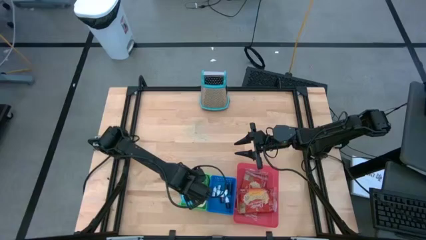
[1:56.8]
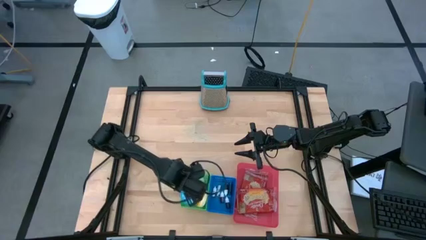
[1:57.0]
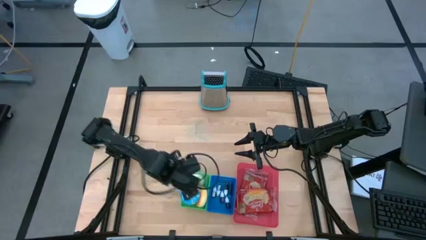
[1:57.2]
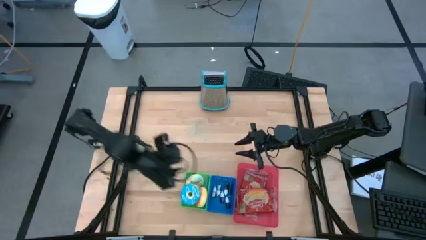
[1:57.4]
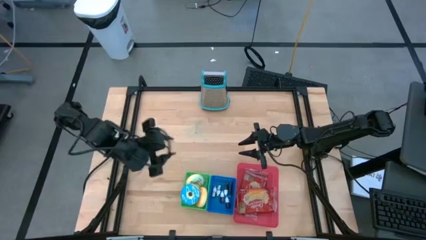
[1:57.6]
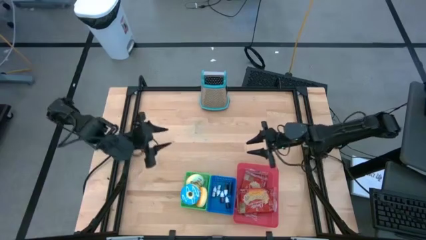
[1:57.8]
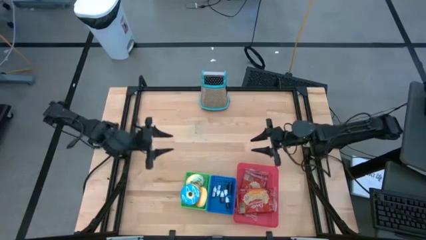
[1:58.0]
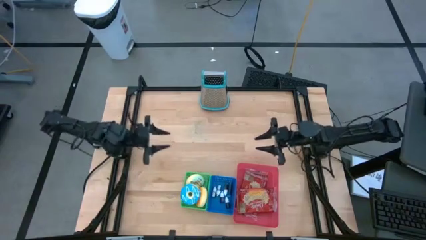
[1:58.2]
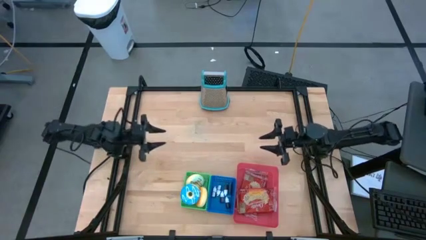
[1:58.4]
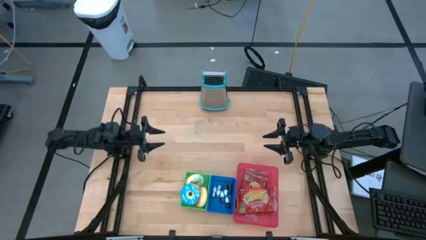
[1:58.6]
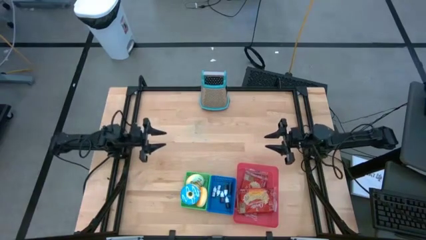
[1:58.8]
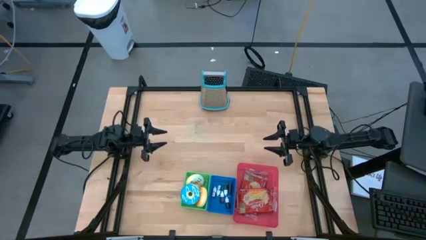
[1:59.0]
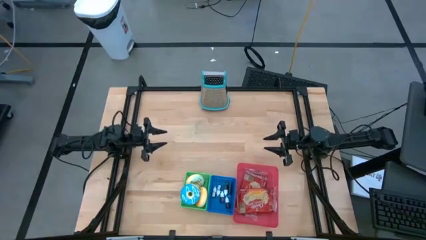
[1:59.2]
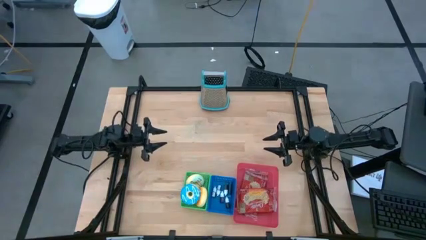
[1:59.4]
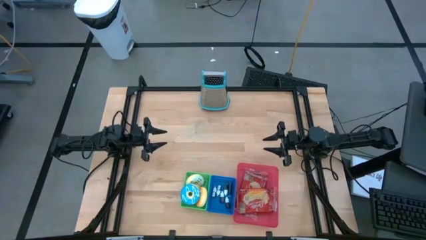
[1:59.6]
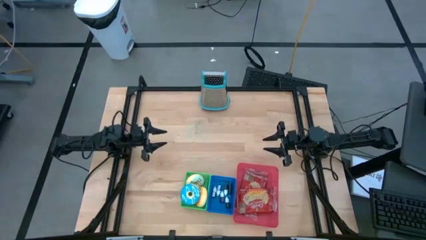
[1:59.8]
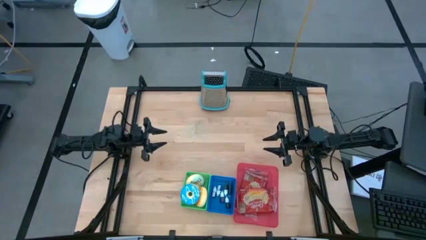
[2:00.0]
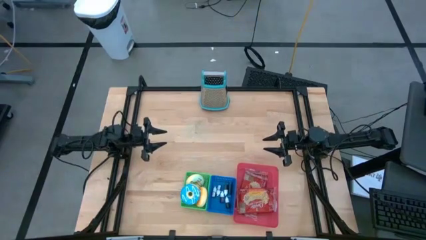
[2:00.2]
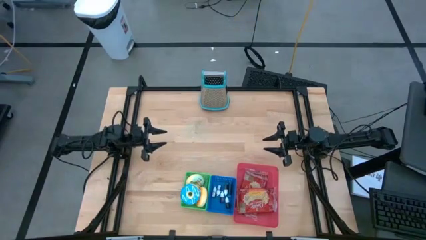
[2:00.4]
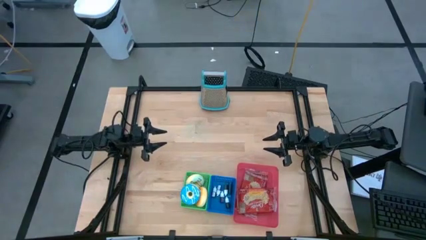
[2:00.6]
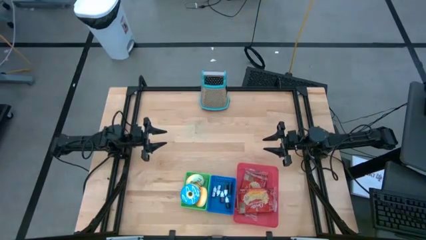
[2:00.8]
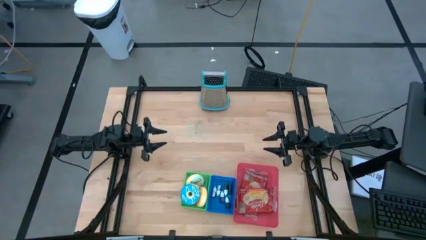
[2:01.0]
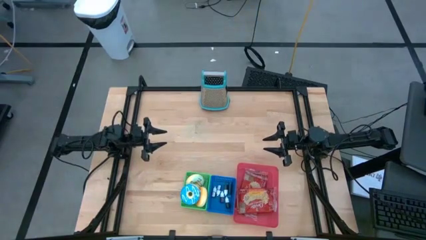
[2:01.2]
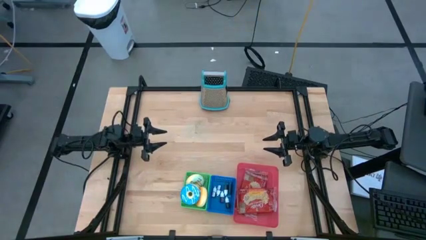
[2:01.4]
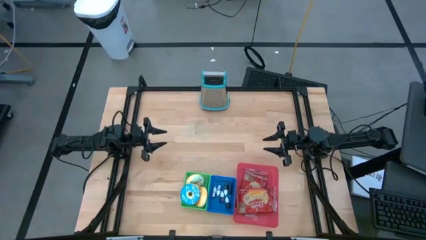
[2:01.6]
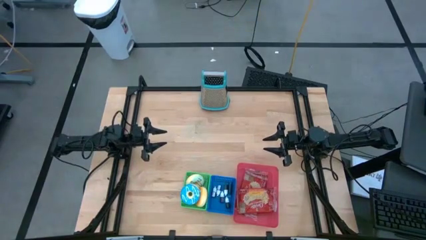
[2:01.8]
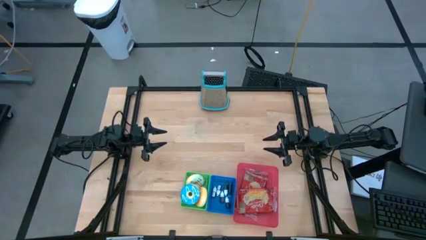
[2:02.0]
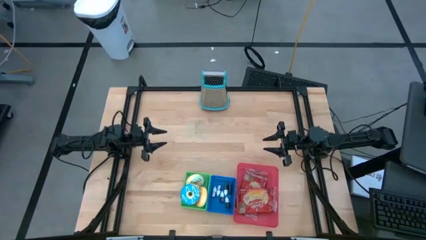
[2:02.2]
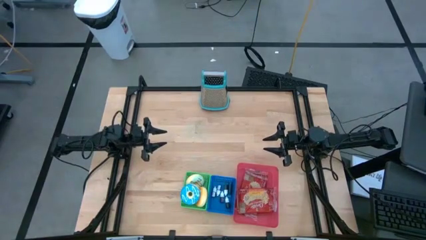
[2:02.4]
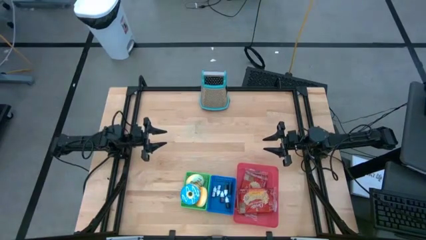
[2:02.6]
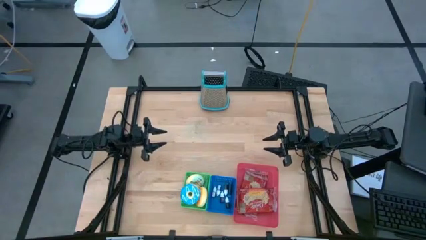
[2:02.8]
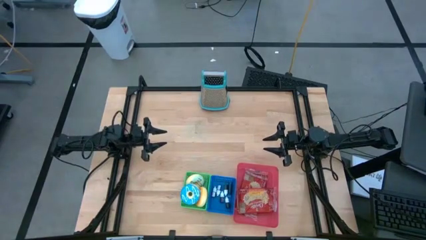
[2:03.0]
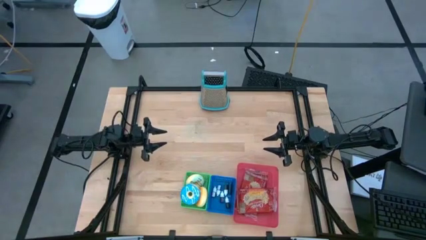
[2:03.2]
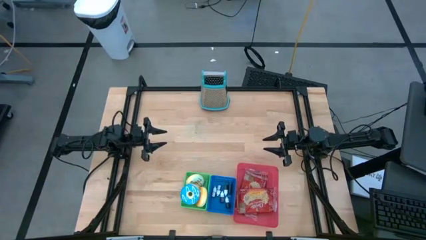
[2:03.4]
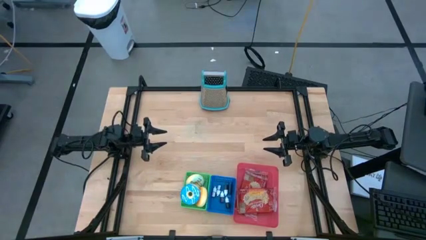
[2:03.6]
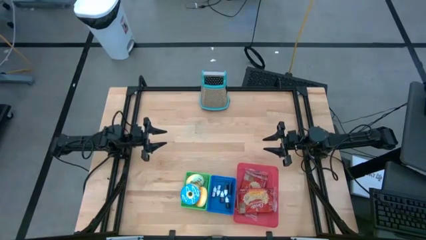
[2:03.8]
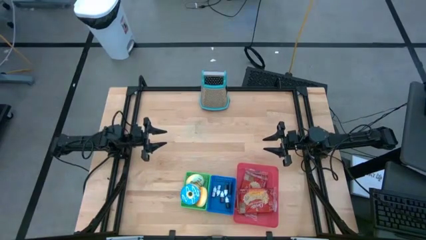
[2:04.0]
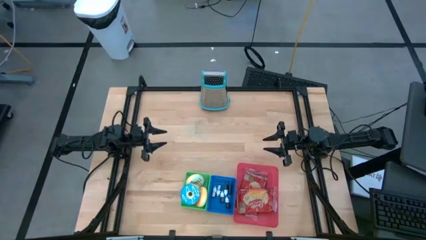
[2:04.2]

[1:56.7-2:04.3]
Return to Home Position

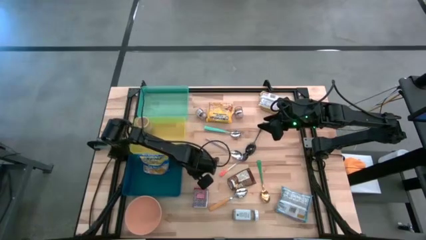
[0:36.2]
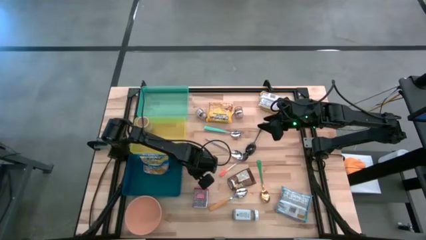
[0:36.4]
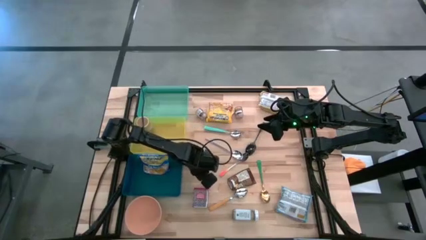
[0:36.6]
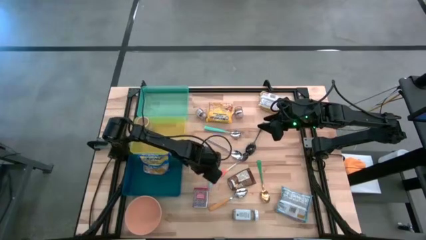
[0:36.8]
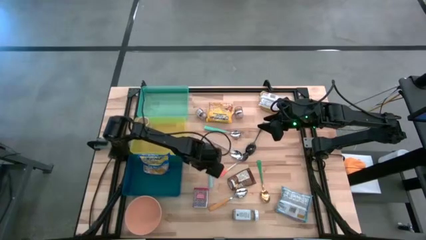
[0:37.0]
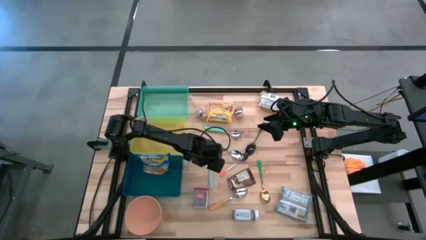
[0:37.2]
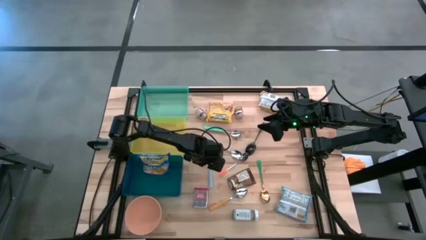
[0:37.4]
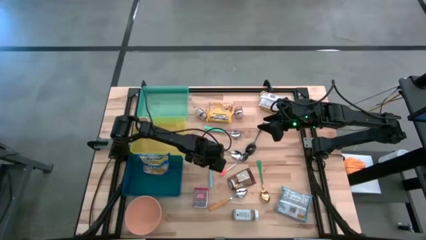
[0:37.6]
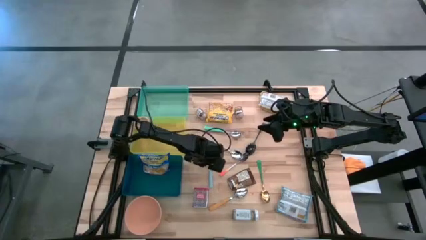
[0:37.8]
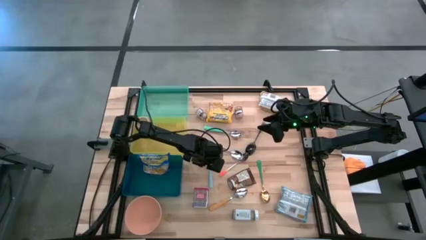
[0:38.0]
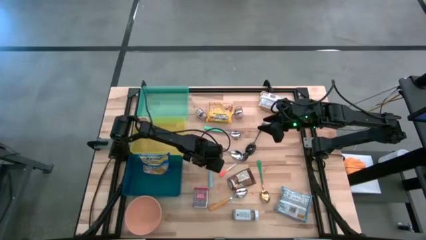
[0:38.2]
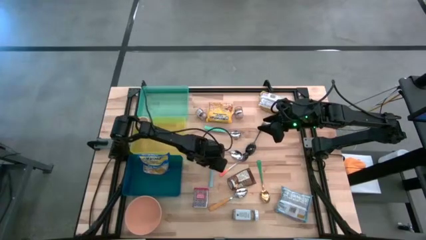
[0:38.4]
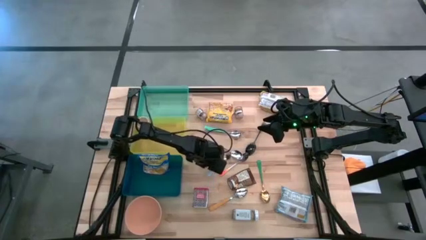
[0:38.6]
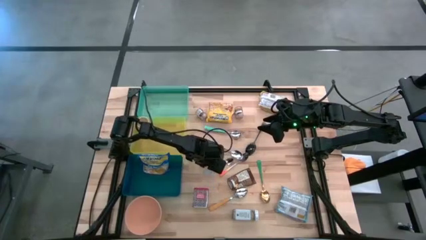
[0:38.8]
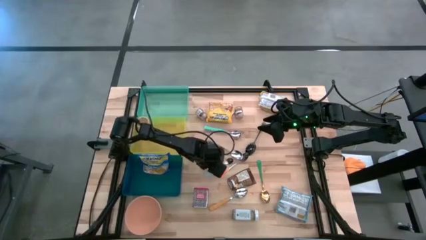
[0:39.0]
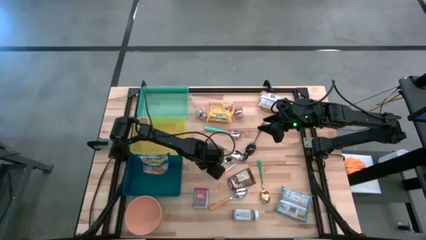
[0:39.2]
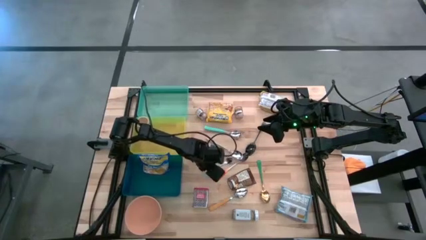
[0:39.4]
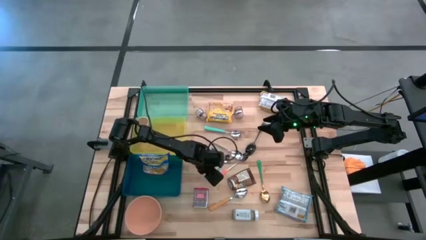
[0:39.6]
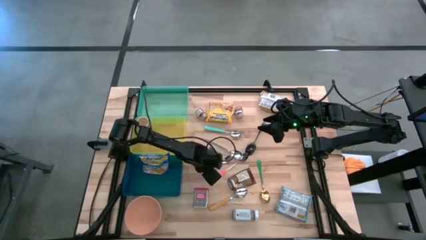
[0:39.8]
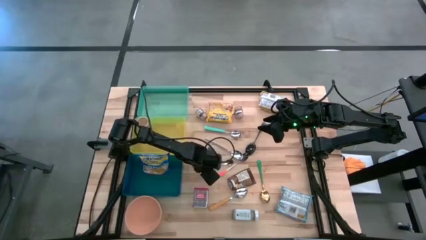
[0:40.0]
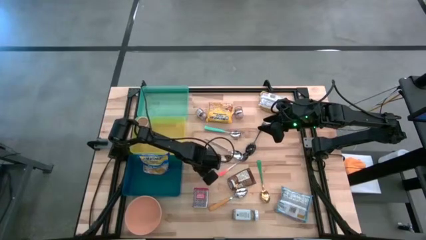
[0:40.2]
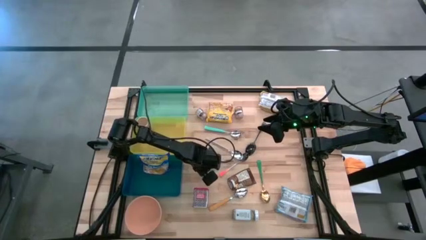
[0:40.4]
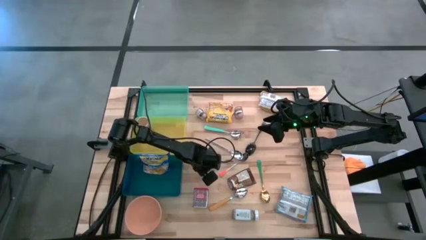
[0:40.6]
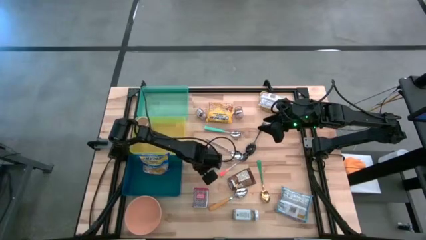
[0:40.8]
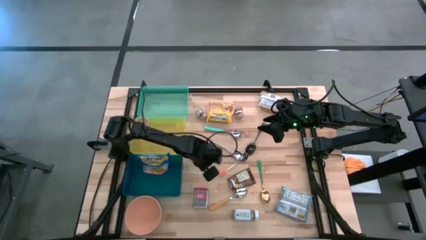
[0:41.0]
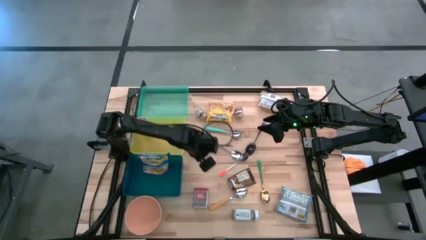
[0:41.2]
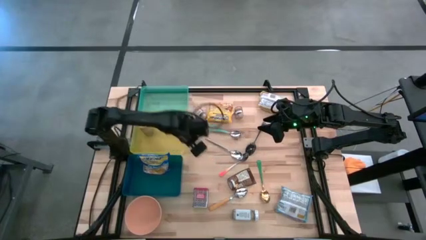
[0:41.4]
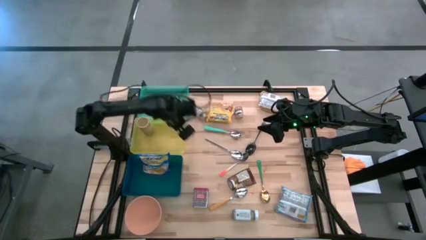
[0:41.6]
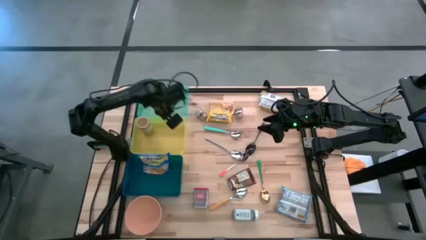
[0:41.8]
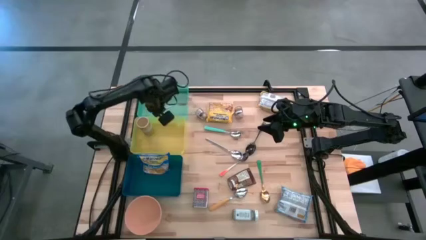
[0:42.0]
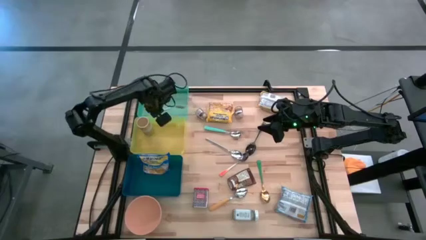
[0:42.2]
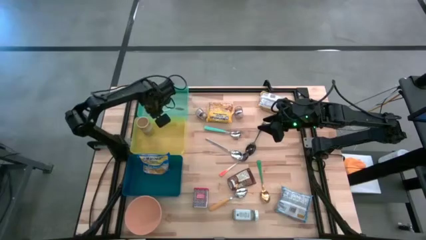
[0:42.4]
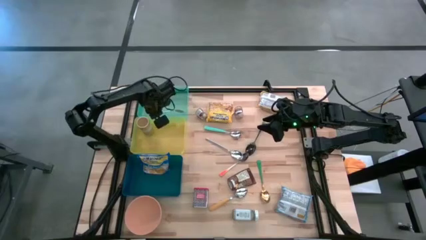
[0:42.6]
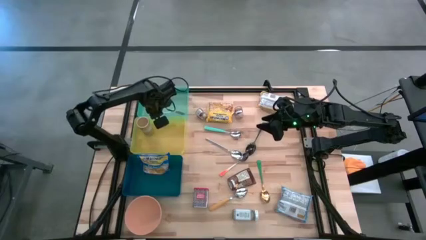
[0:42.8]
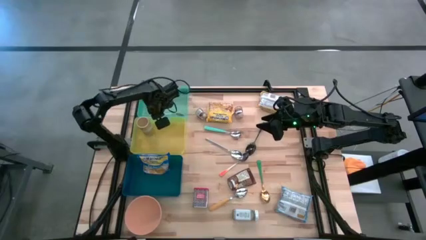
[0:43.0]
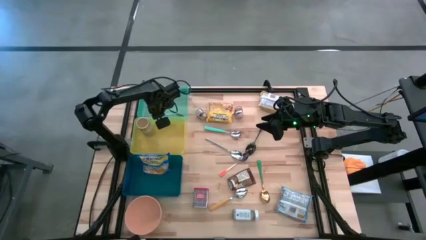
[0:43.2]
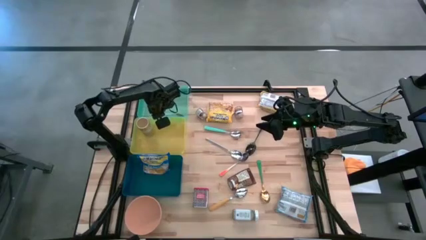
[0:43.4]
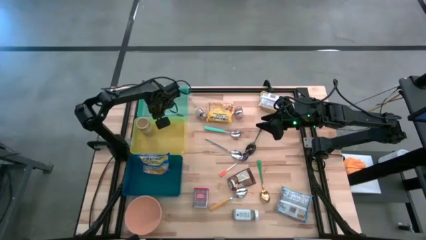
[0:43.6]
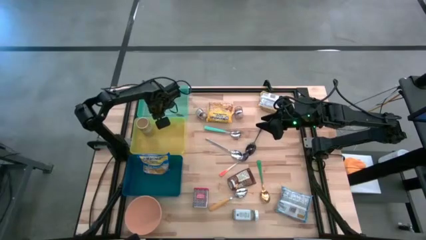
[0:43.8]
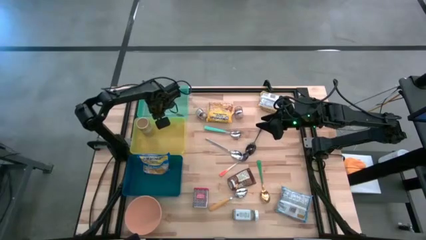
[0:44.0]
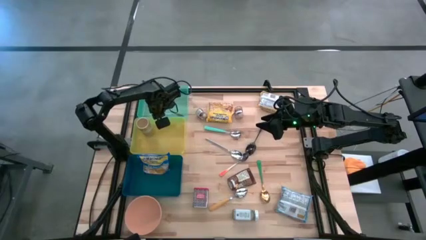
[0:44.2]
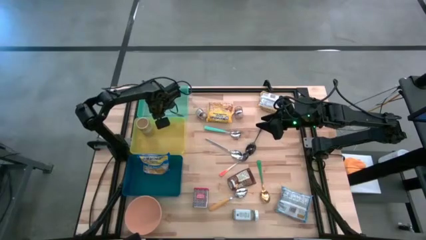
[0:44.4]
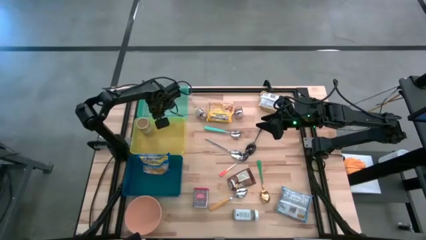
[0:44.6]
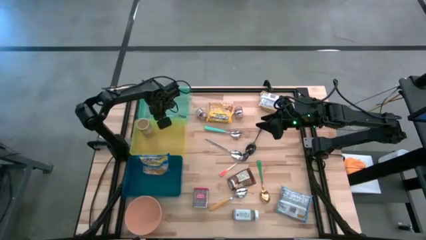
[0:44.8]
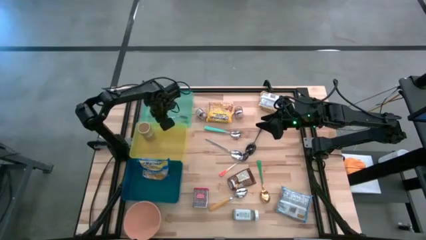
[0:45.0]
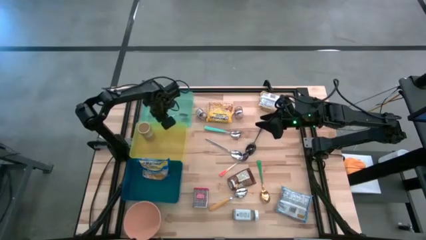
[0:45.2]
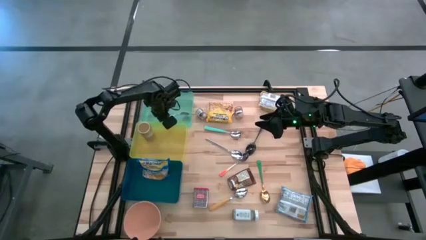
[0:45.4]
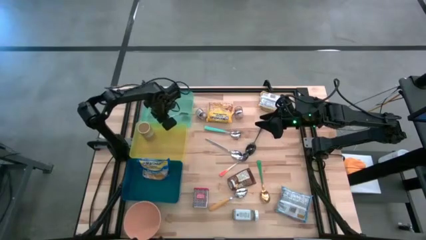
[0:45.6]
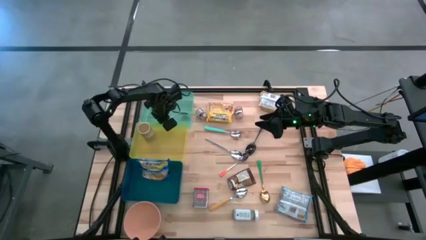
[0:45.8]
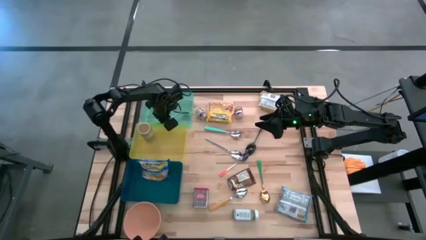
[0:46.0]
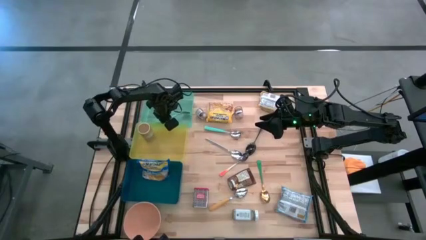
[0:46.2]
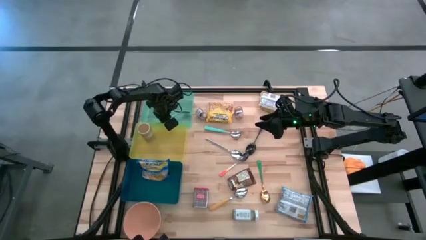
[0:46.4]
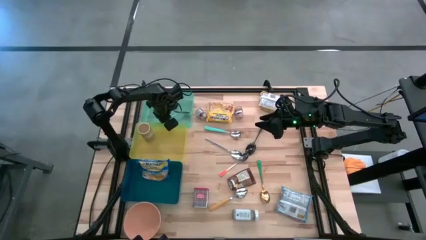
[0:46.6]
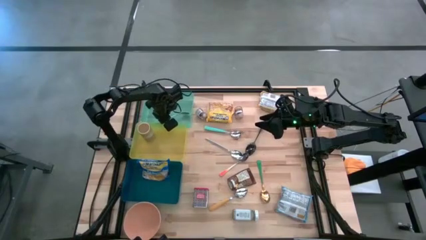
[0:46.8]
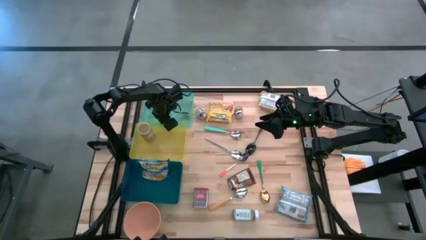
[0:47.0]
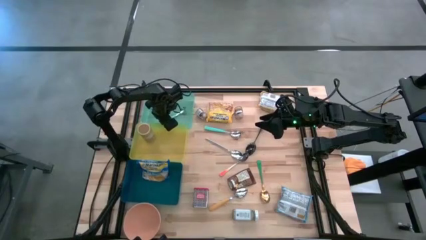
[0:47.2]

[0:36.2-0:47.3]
Put the blue spoon into the green bin
